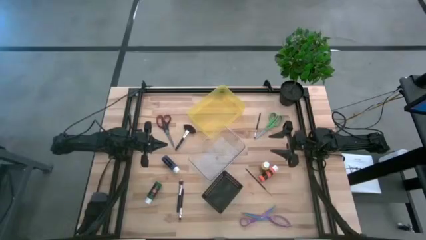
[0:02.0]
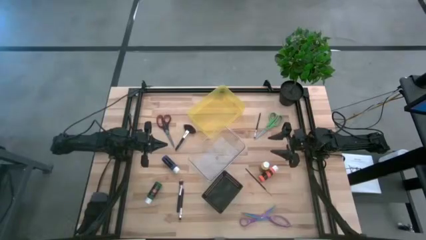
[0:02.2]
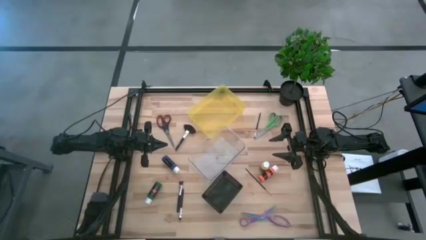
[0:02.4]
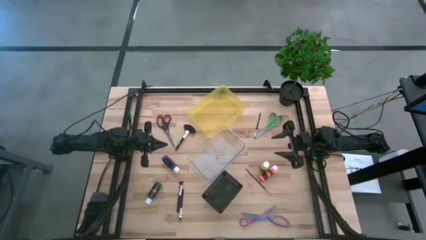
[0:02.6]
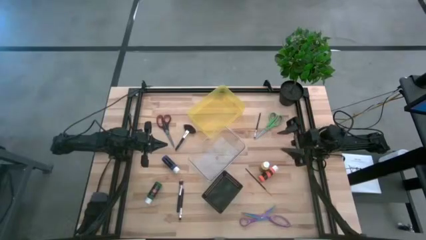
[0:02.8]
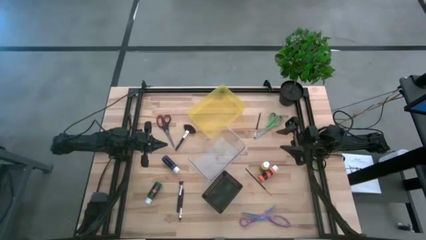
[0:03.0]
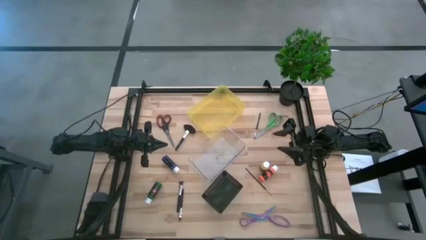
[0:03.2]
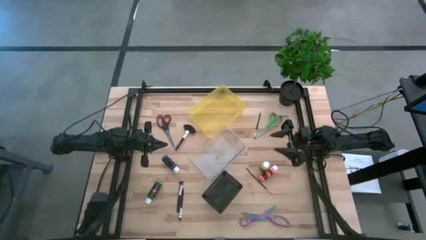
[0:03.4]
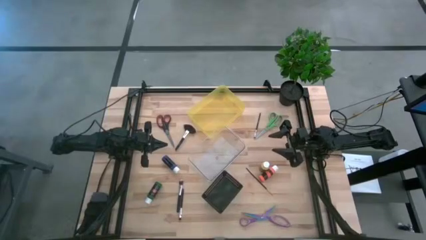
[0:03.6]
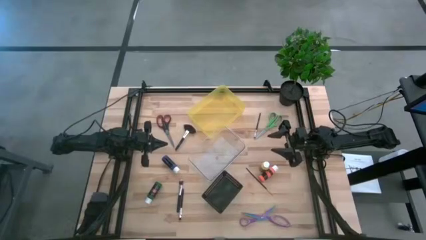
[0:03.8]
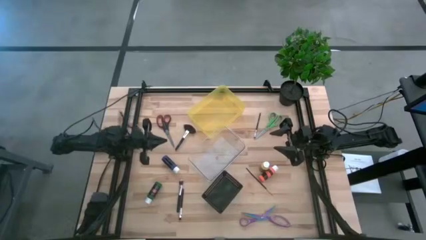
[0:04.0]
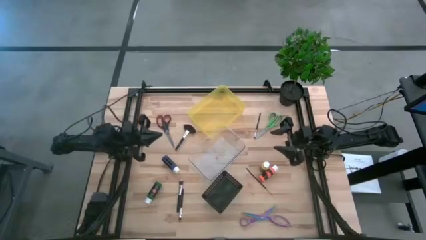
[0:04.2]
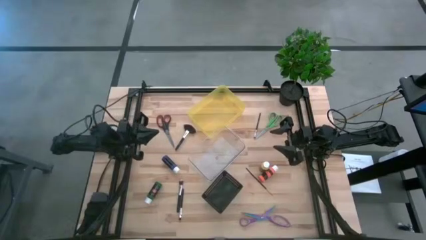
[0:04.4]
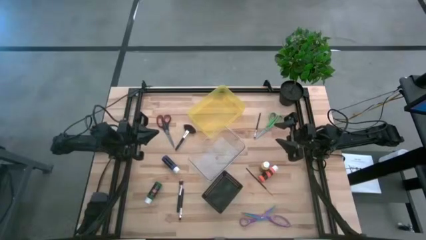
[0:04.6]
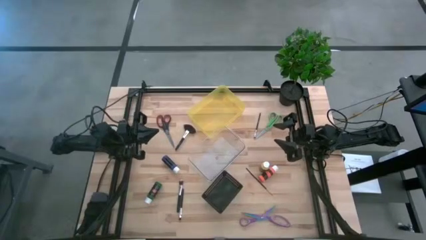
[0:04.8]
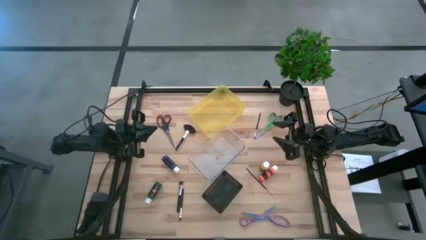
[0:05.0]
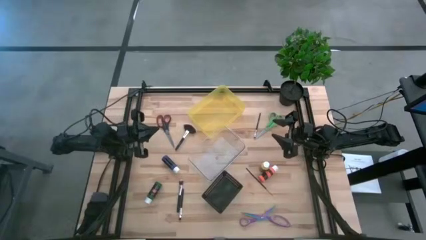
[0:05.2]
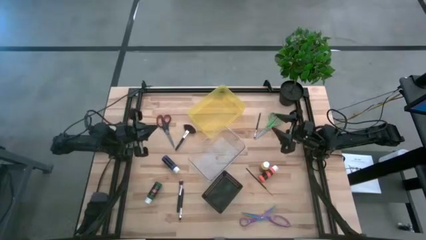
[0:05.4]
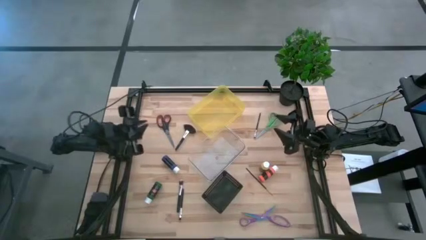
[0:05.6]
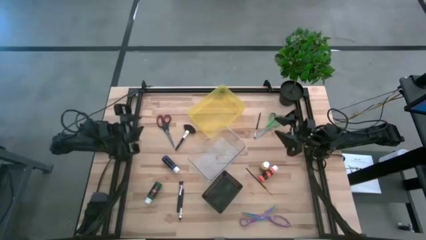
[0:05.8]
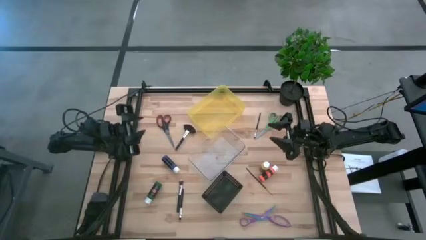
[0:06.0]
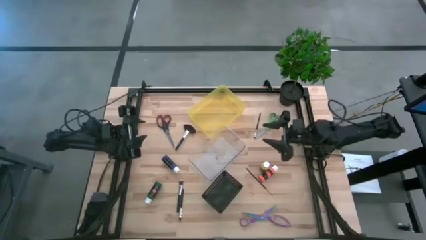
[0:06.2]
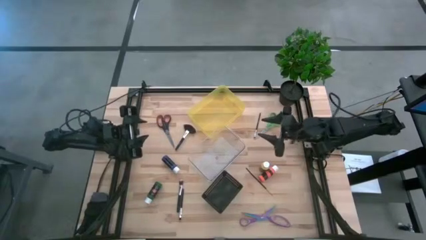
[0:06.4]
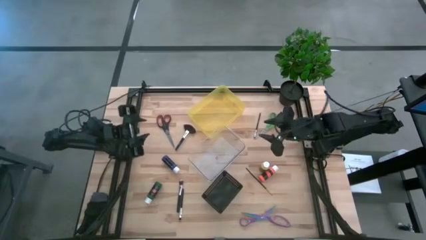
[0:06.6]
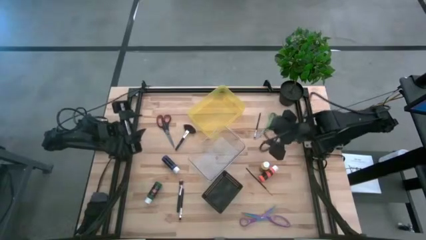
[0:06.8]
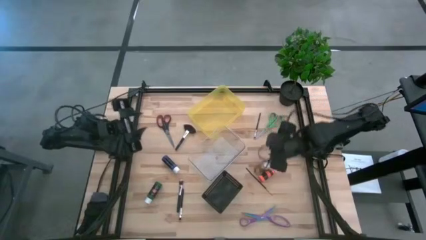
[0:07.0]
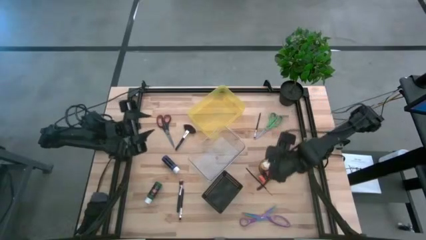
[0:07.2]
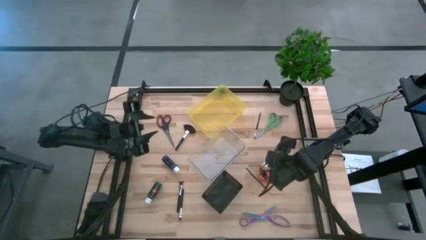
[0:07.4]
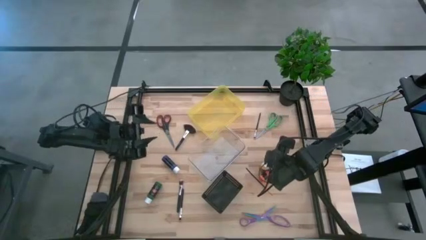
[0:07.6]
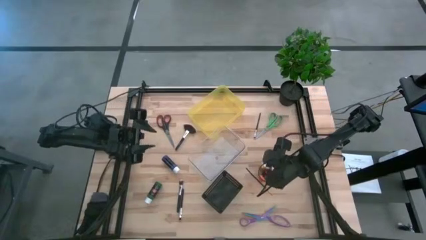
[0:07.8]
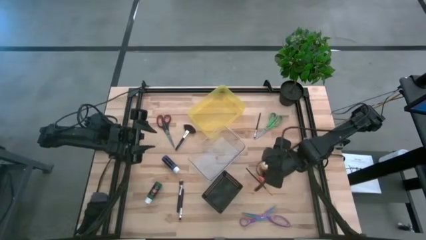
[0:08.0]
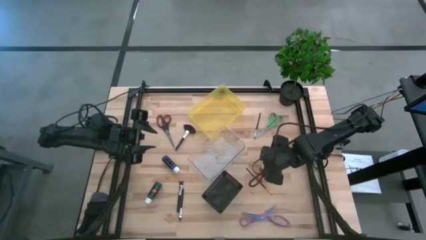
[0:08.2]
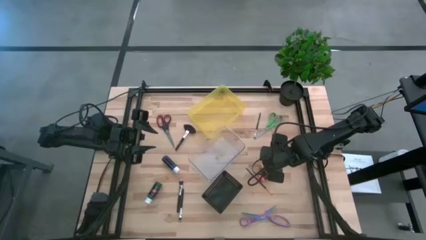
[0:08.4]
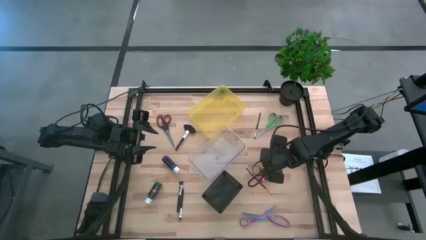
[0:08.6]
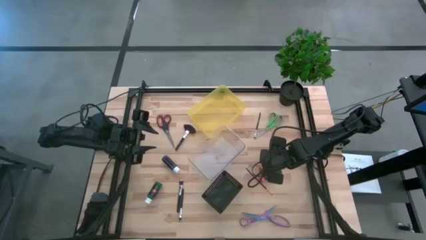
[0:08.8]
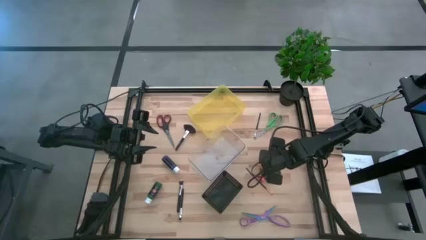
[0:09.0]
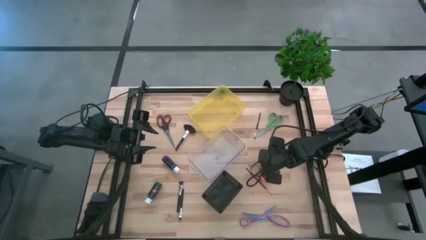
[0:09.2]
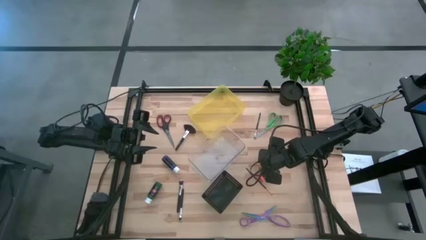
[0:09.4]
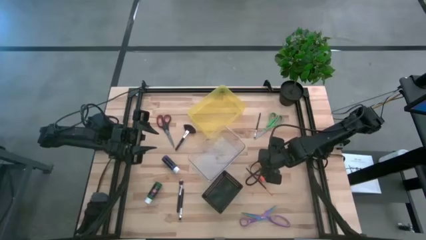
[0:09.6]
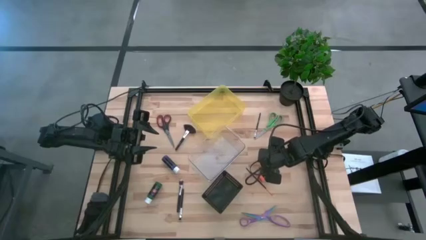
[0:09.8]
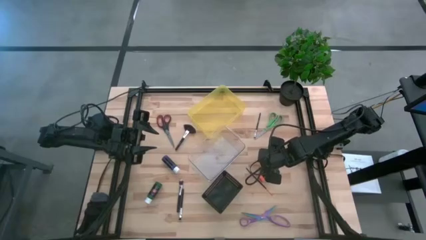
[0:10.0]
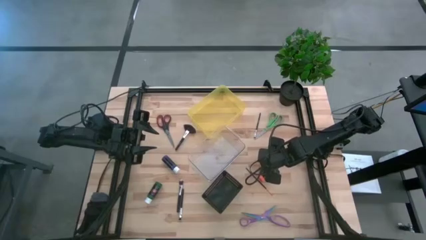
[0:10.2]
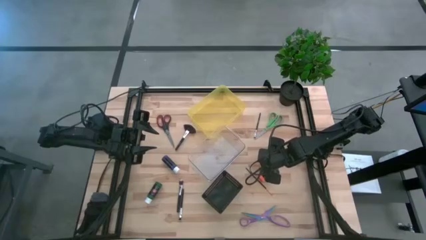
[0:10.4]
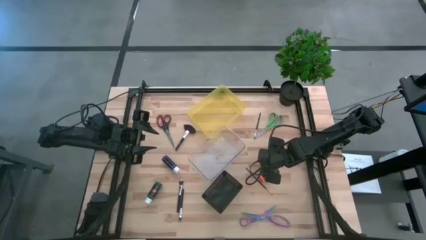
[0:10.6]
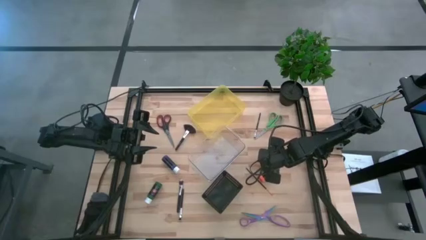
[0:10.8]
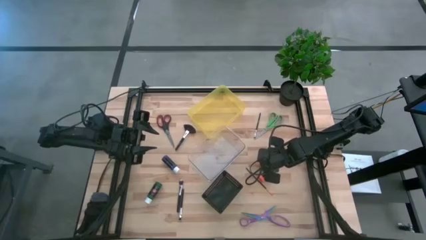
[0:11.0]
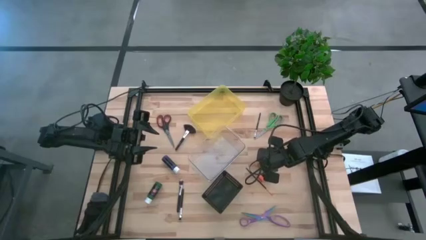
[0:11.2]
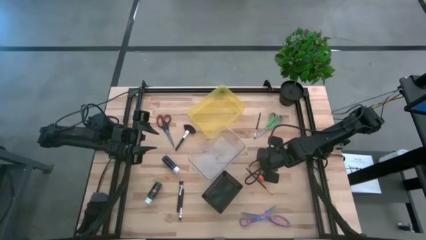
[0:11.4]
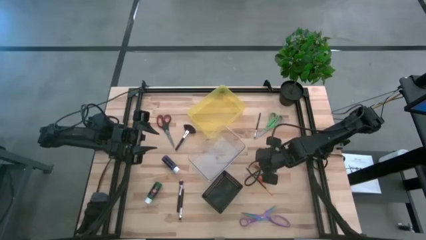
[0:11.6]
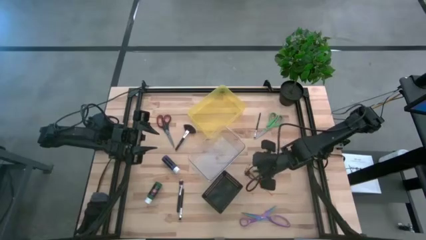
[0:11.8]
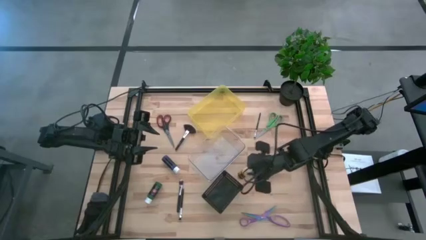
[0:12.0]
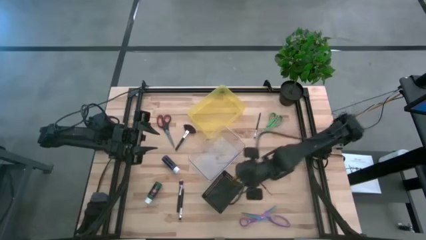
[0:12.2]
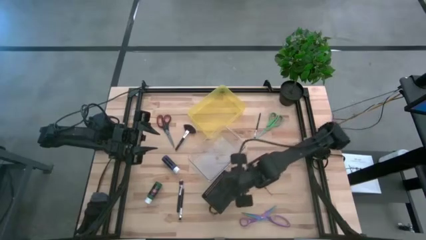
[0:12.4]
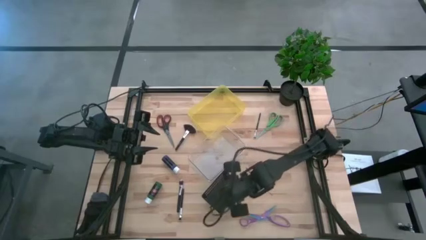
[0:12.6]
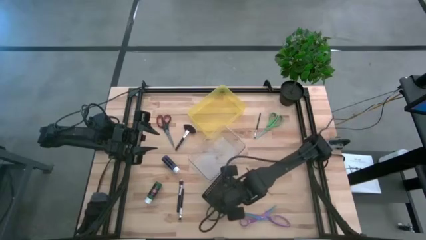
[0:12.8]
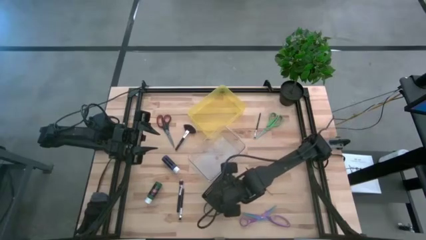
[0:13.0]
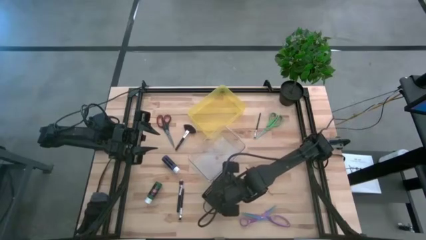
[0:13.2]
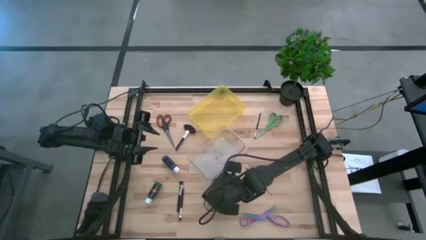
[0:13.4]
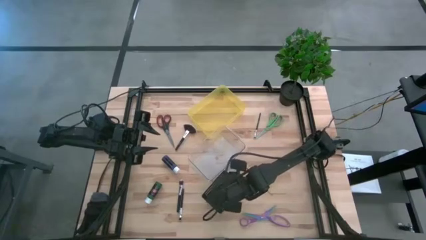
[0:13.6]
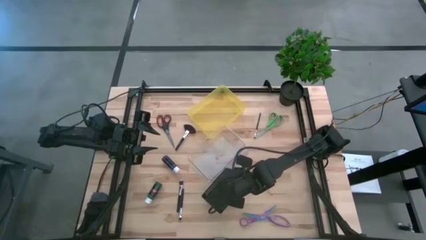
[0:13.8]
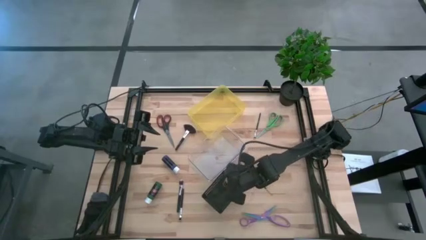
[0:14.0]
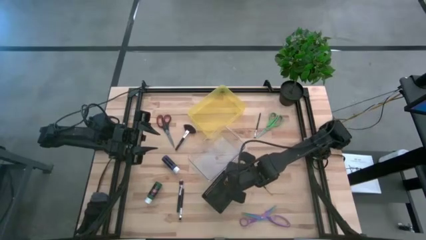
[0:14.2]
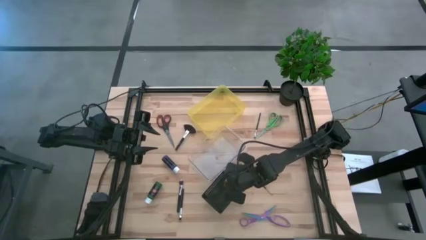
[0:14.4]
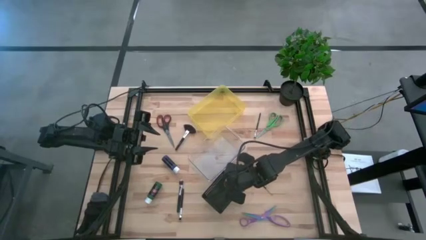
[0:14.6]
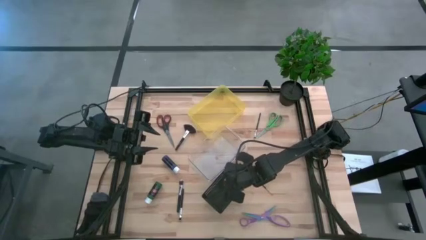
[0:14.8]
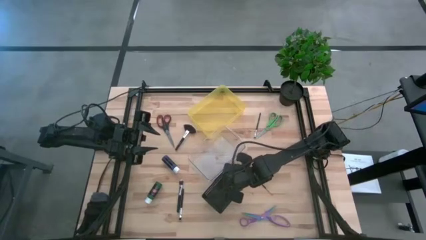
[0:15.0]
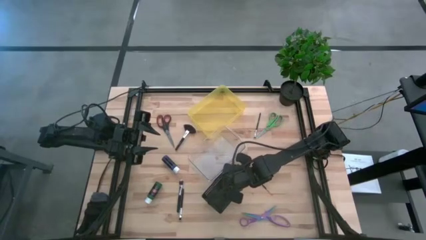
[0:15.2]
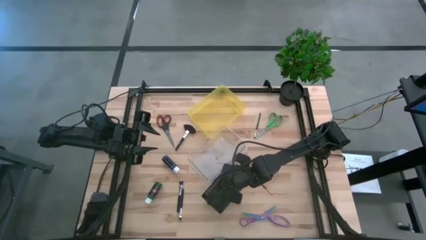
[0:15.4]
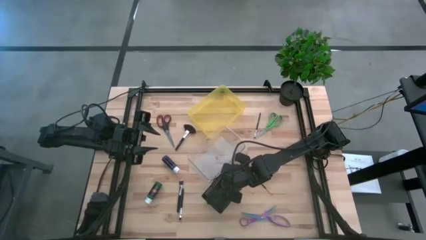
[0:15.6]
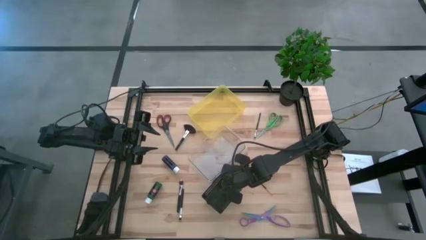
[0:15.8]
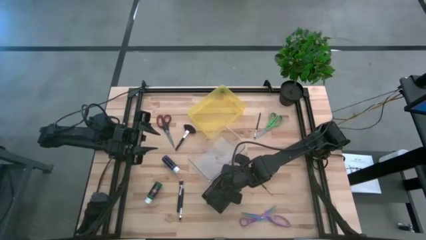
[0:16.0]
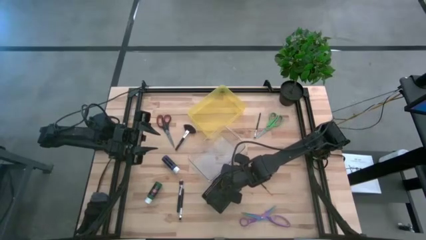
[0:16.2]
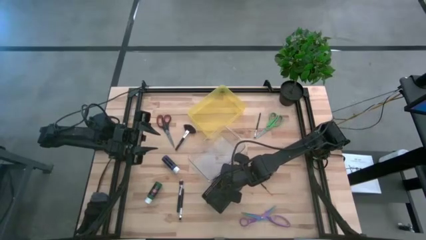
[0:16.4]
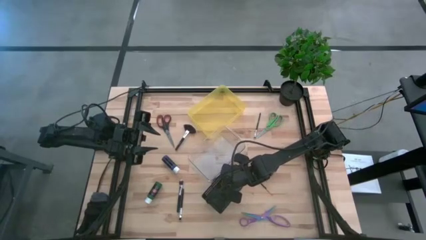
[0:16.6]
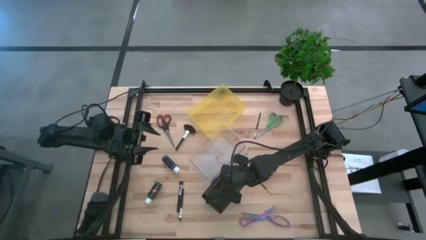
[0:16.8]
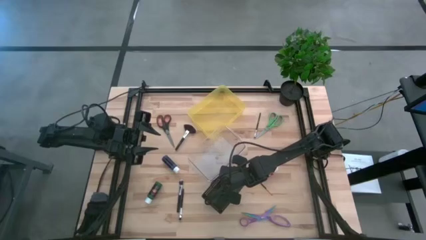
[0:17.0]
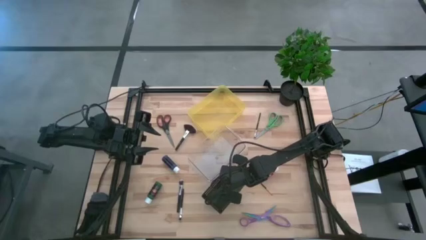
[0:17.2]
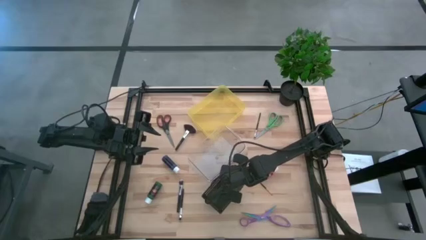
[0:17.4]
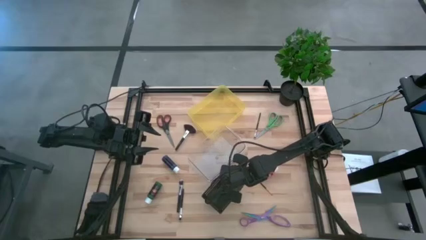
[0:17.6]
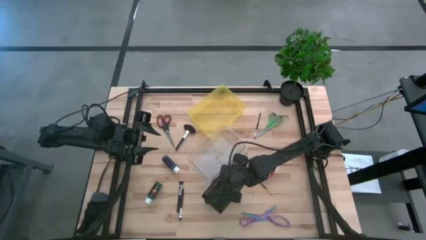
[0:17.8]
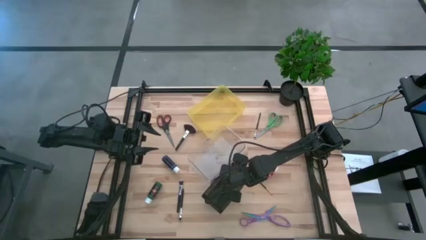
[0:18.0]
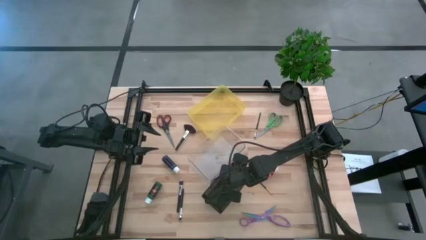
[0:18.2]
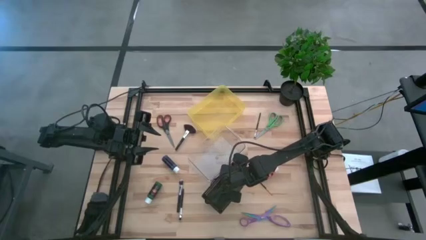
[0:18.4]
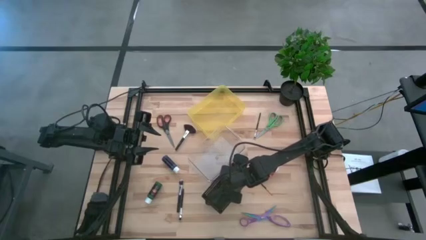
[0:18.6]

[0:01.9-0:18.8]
Task: Pick & Place Paint Supplies
Put the yellow paint bottle into the black bin
